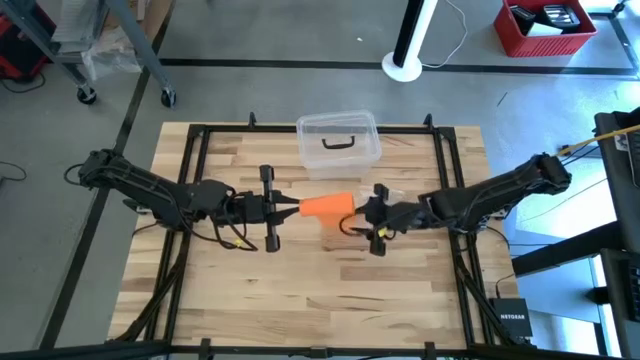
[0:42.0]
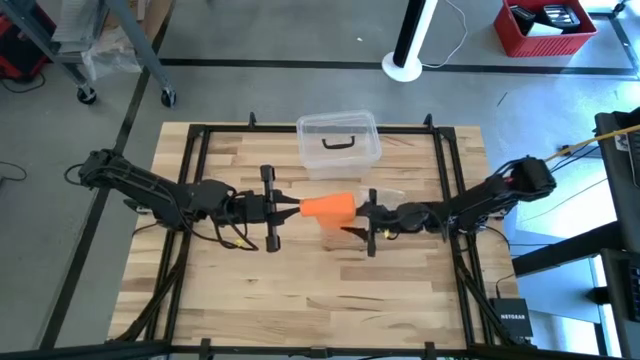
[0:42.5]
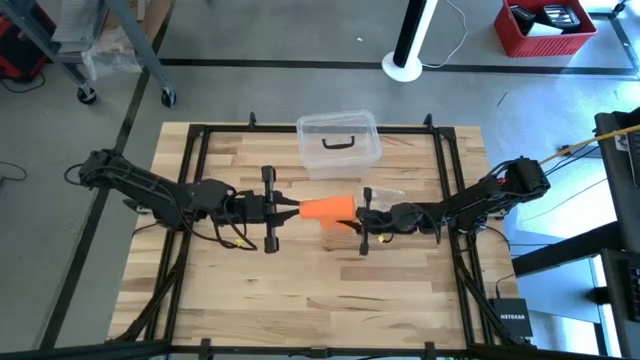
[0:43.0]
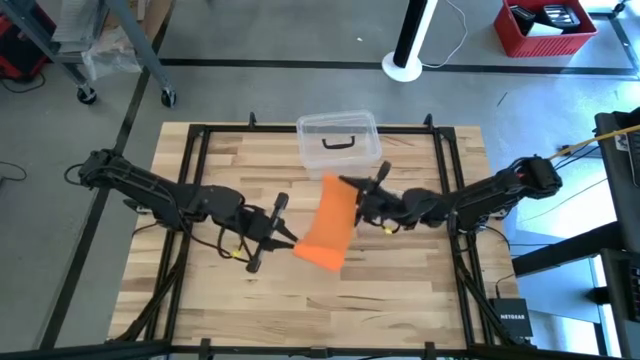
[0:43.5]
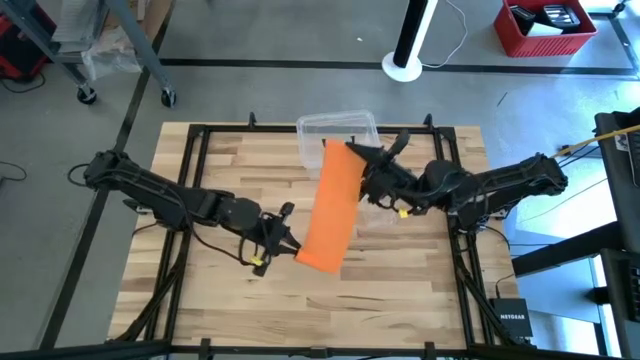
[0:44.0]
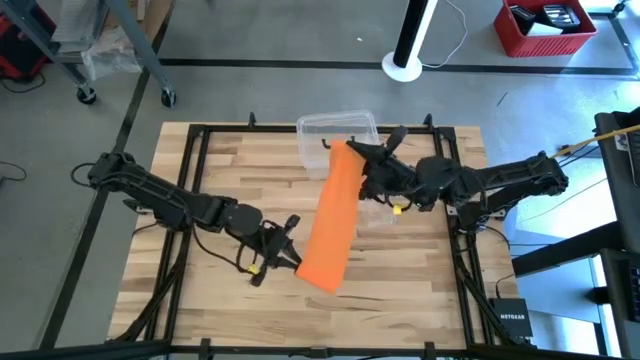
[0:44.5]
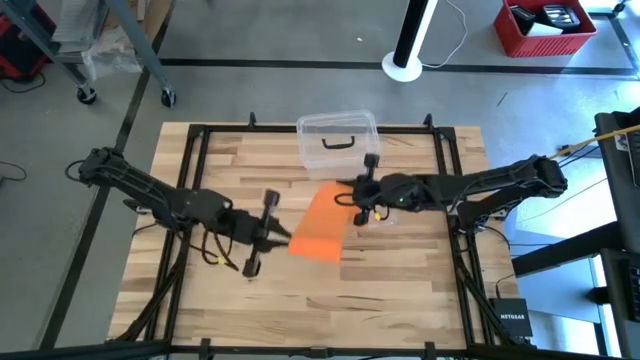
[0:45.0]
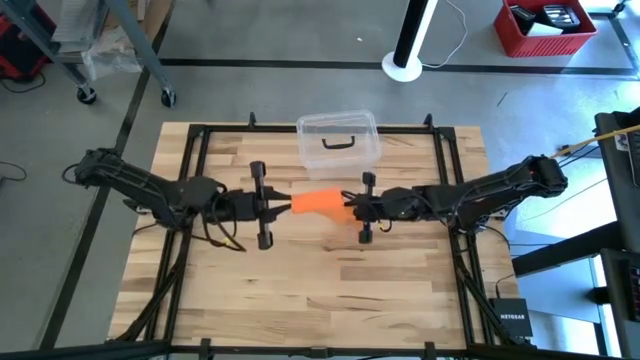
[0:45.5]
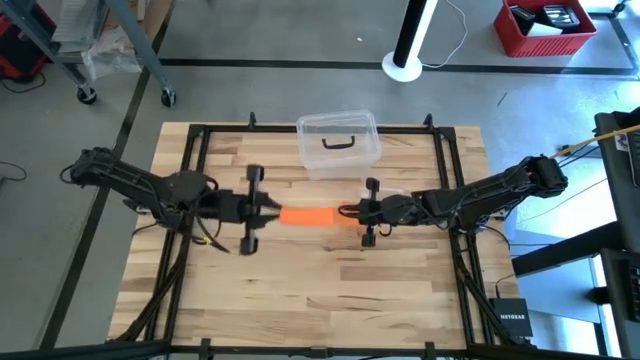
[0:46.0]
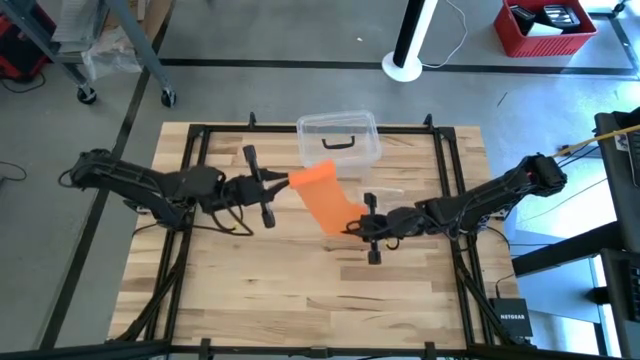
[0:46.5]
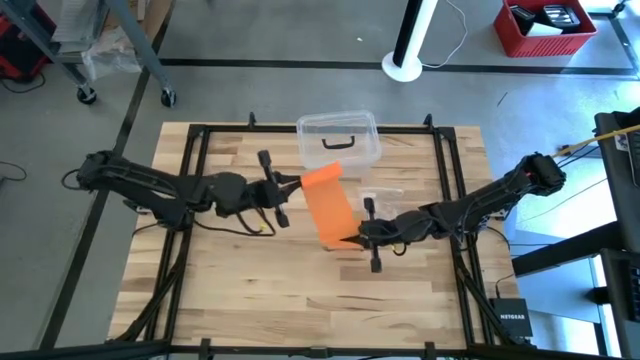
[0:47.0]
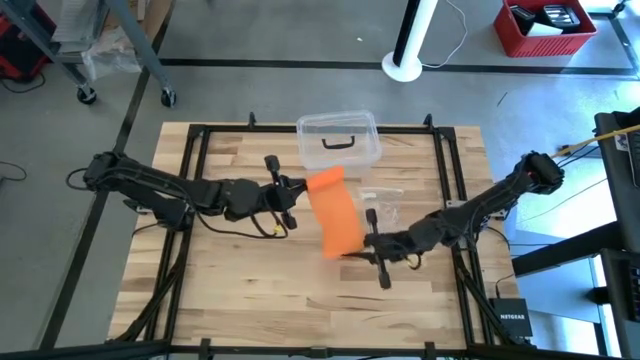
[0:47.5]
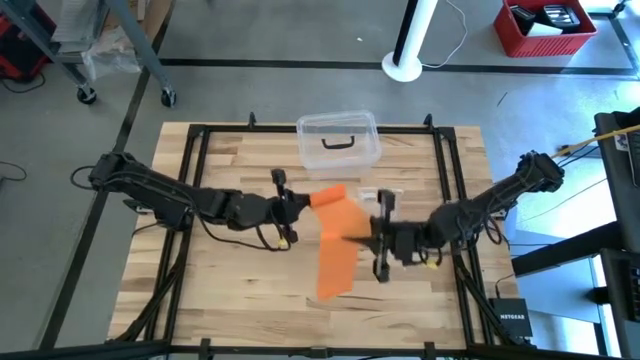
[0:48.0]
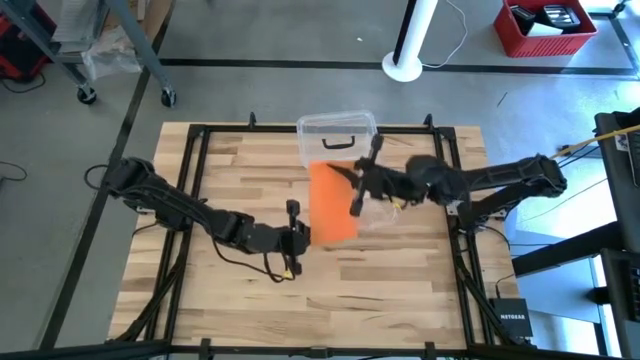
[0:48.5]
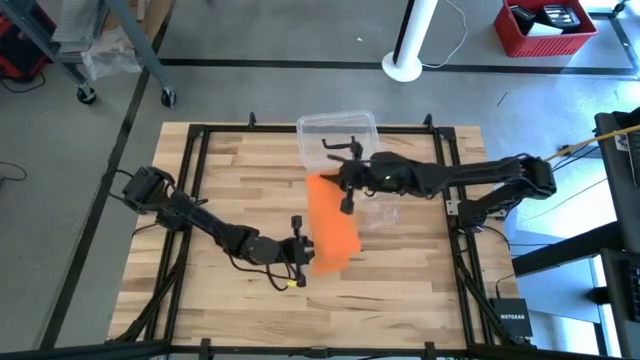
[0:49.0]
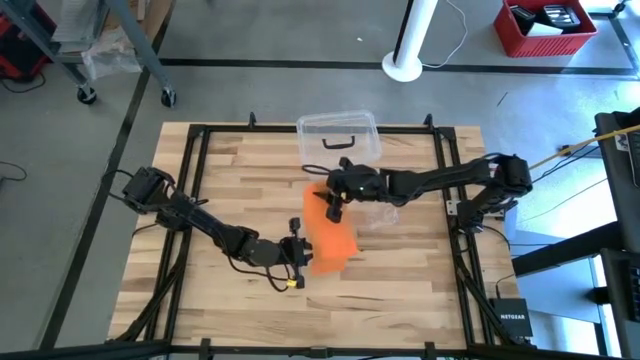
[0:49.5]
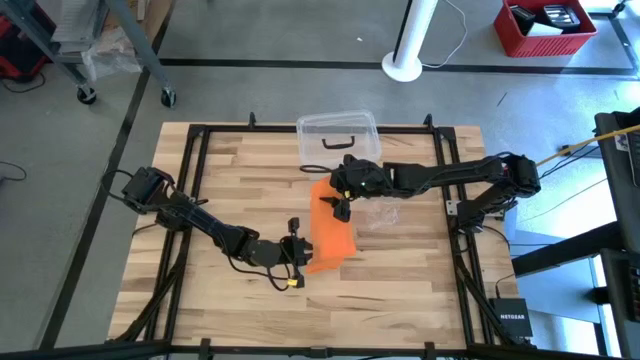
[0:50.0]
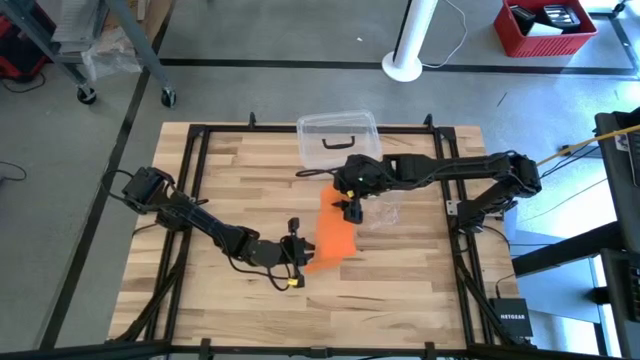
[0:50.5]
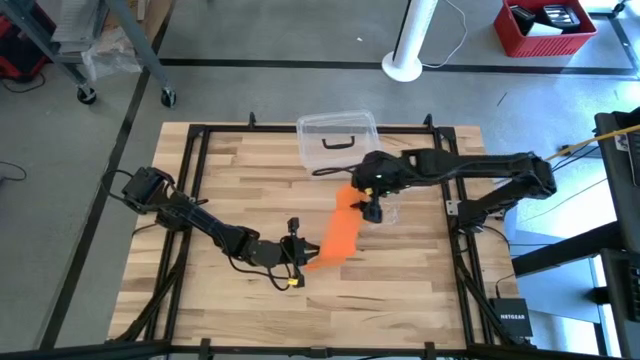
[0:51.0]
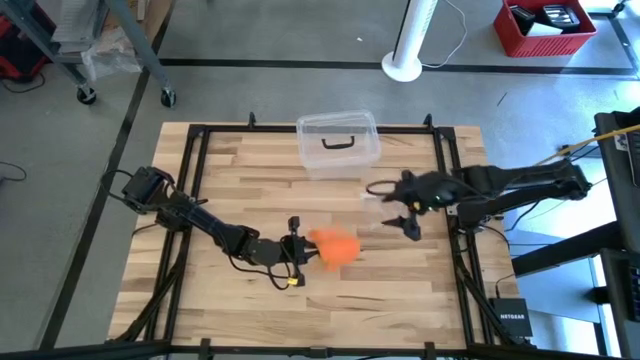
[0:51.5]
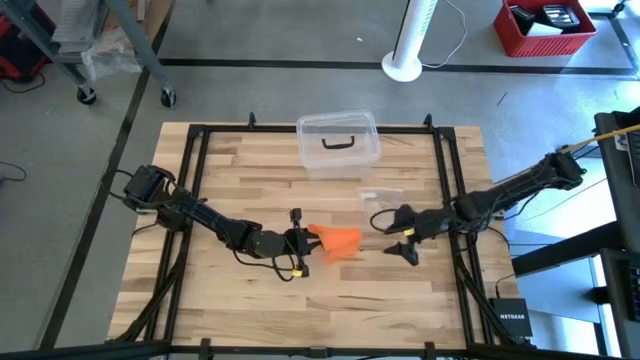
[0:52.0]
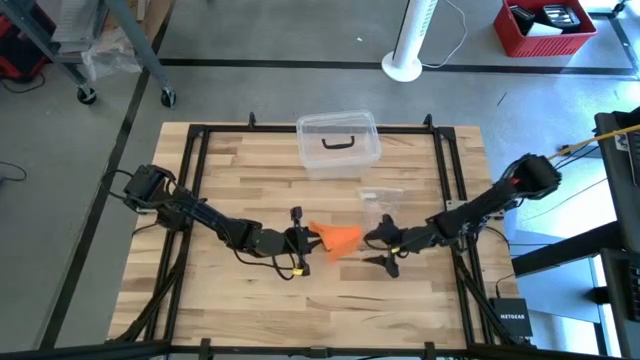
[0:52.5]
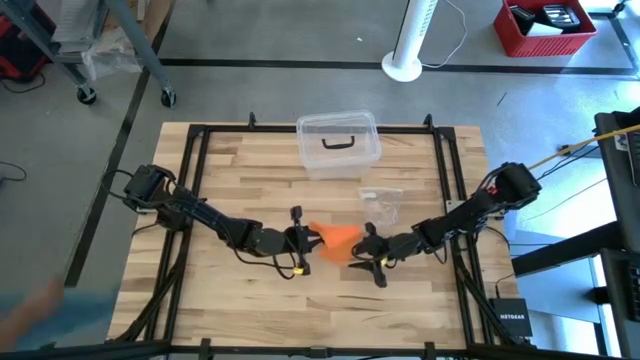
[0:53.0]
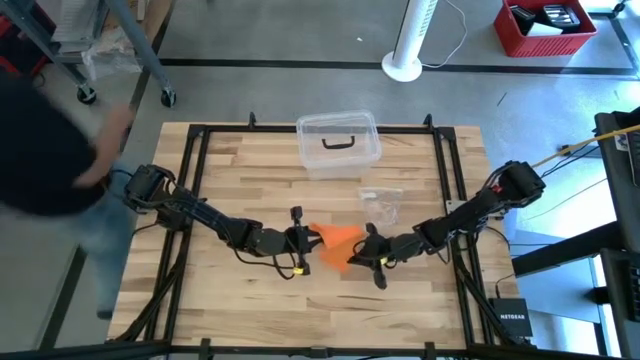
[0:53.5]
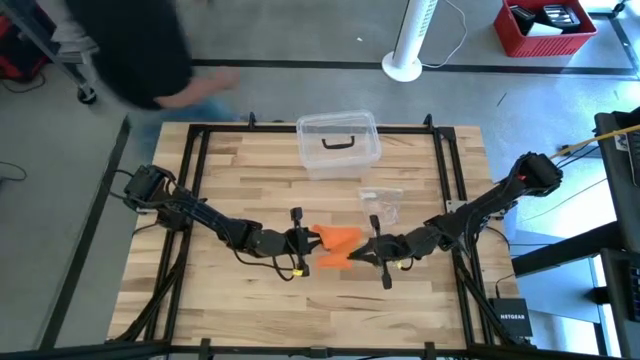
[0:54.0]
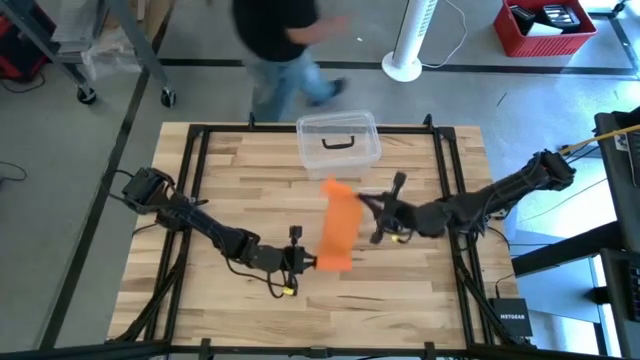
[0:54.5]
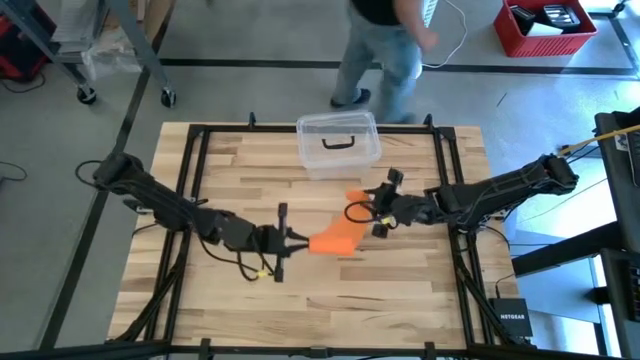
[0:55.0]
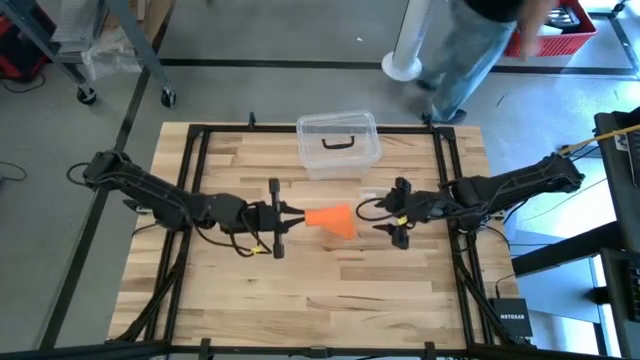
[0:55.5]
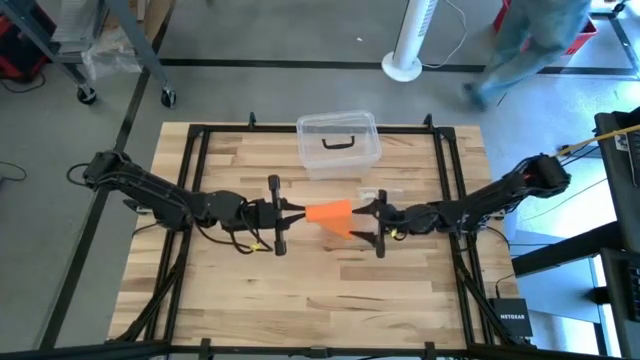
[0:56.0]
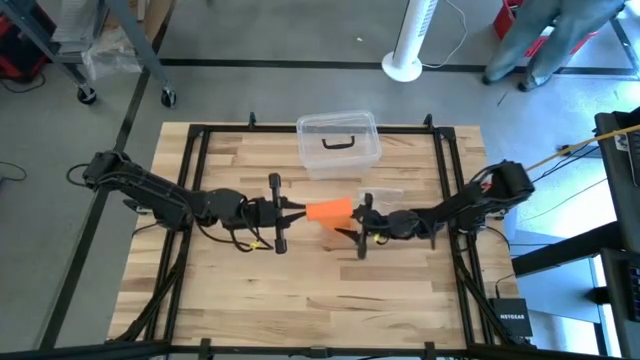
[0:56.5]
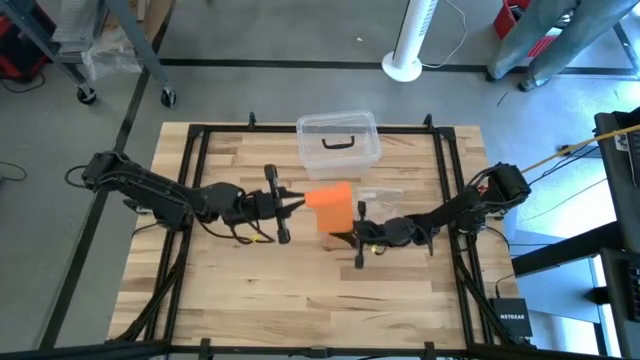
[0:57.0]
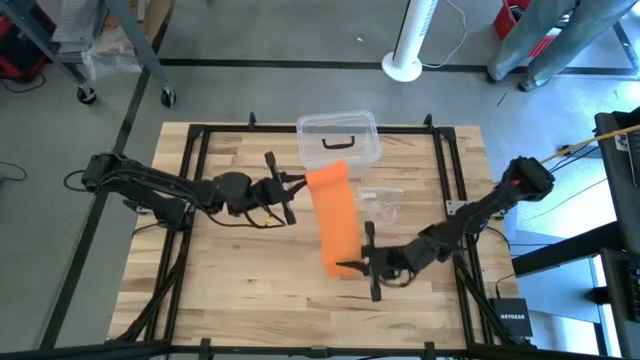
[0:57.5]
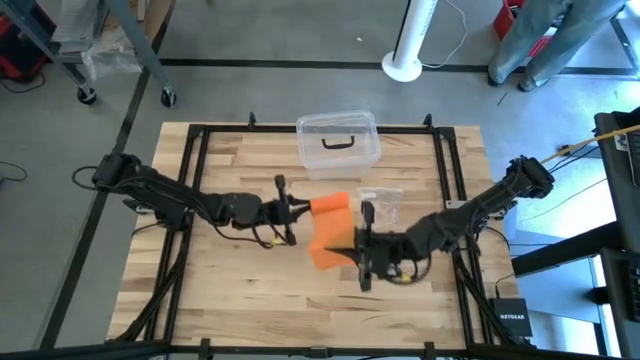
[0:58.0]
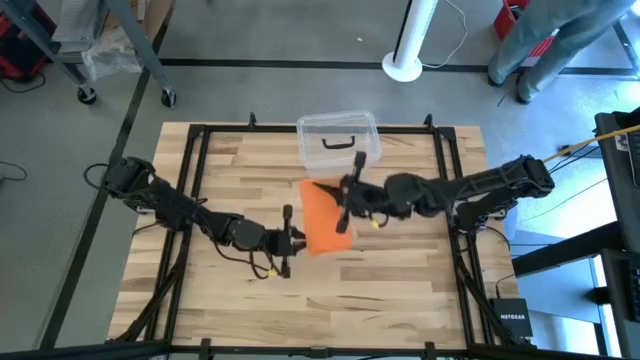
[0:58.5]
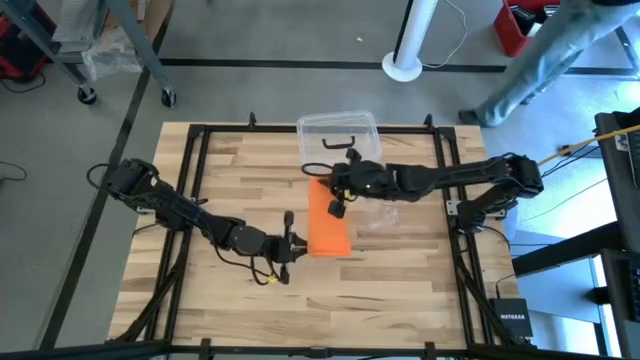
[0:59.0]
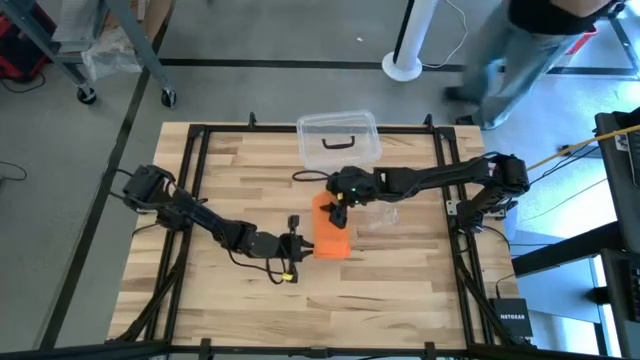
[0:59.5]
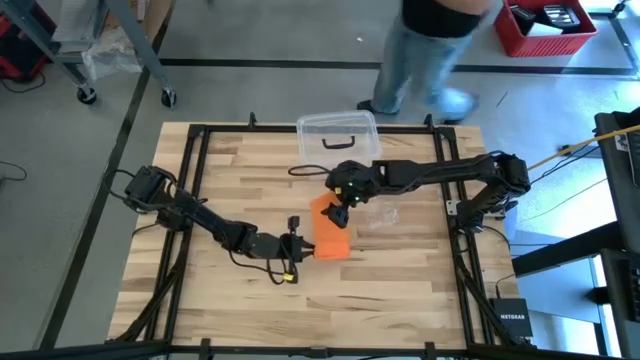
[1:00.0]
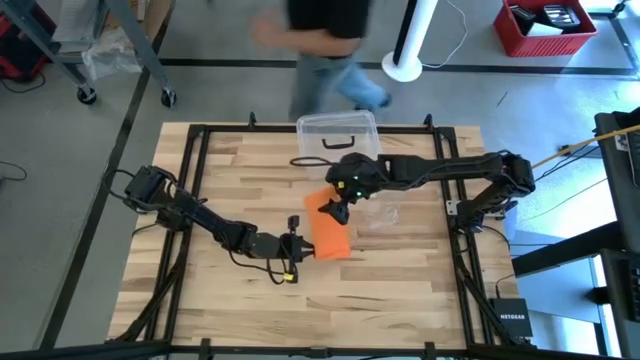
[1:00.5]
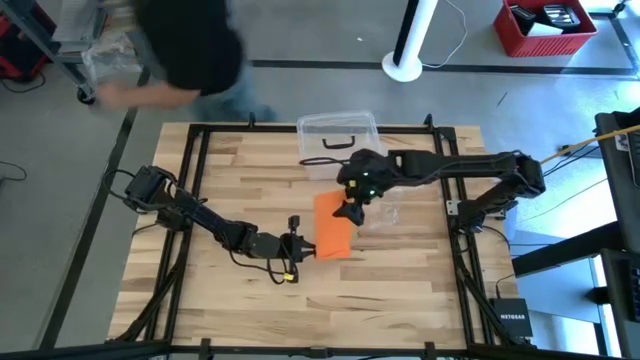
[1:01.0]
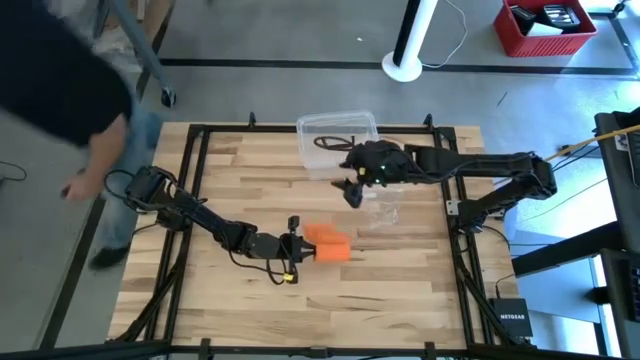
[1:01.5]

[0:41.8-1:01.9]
Task: Roll bandage
Roll the orange bandage
